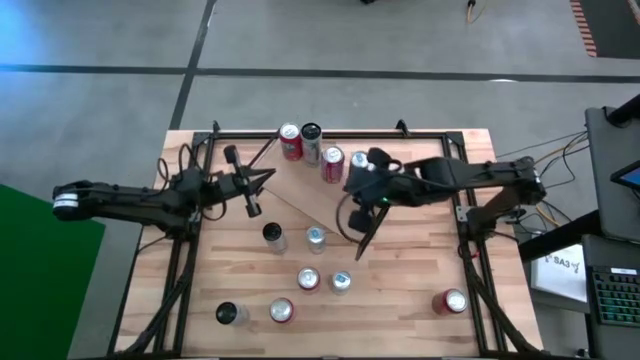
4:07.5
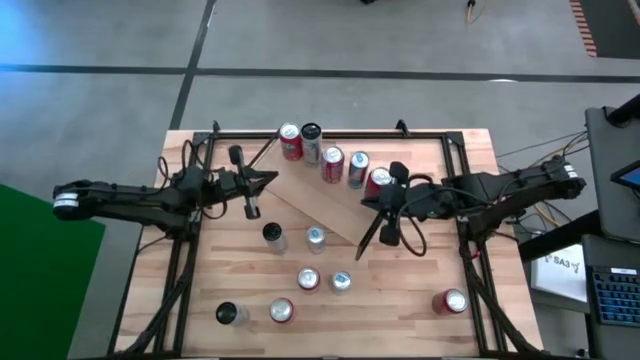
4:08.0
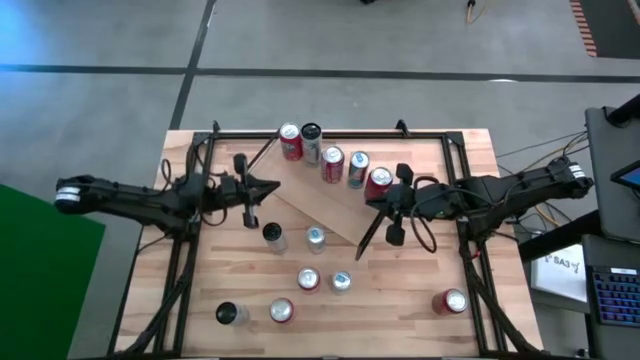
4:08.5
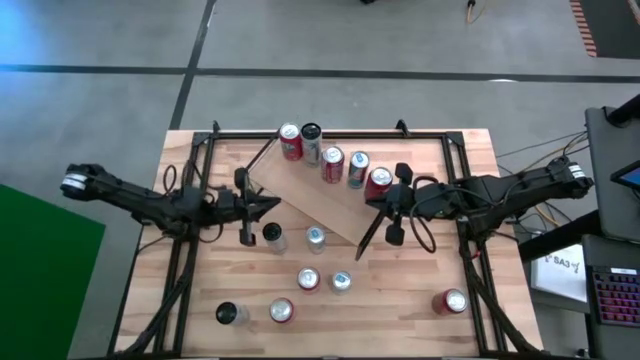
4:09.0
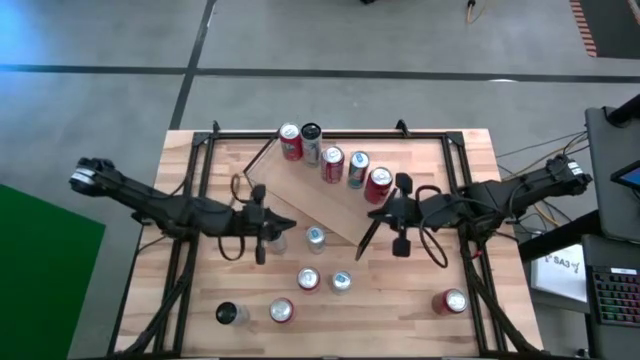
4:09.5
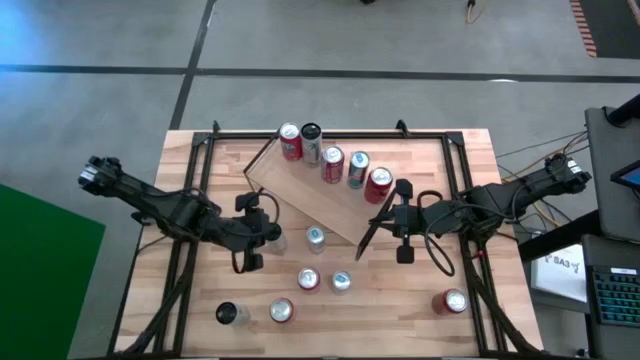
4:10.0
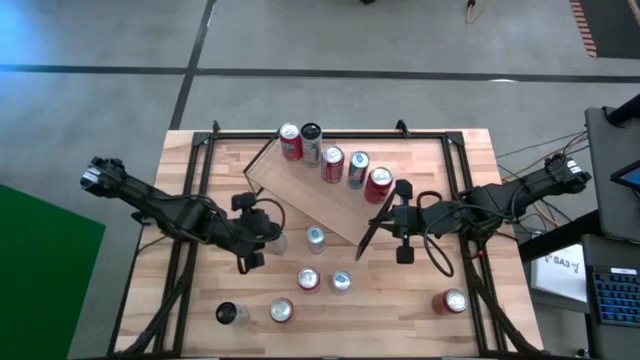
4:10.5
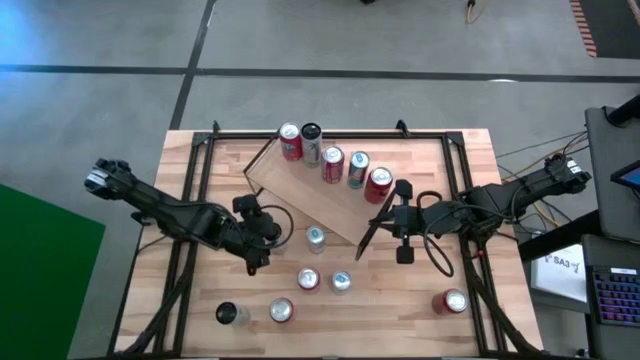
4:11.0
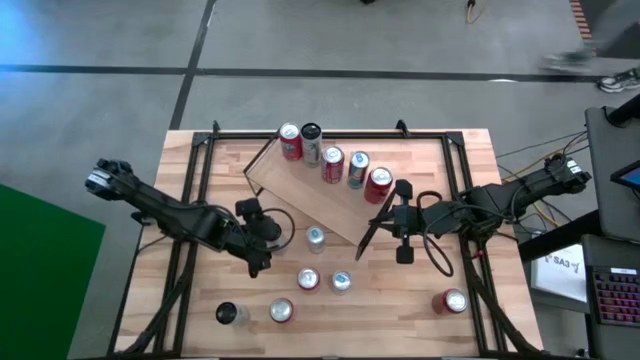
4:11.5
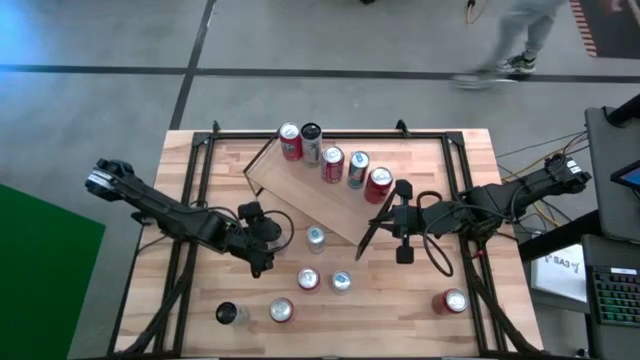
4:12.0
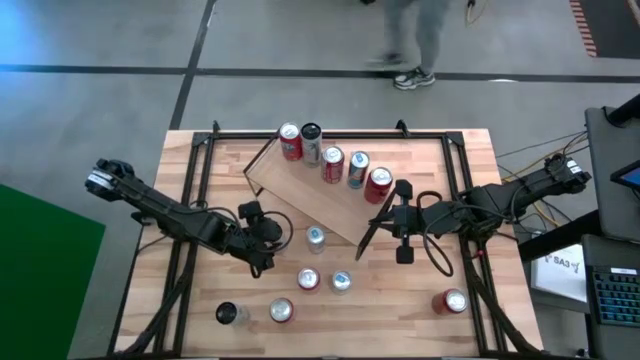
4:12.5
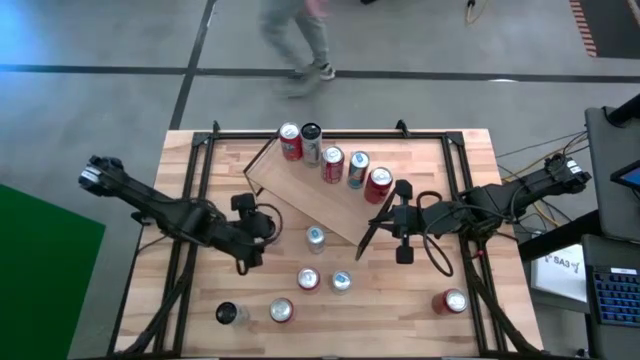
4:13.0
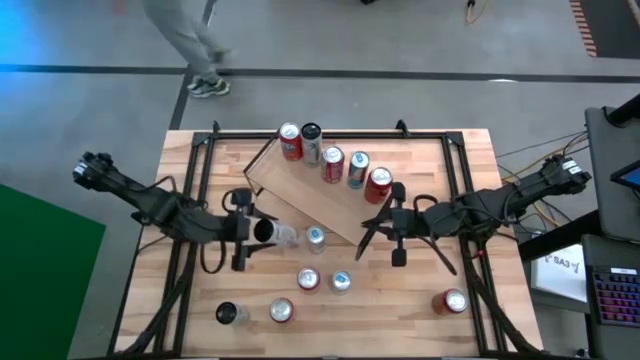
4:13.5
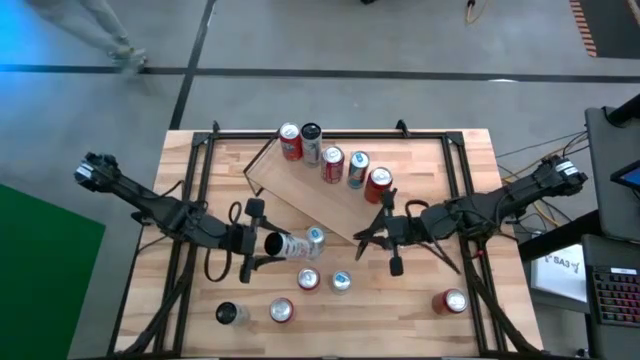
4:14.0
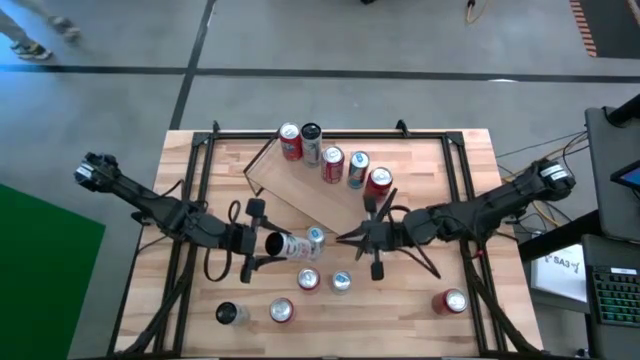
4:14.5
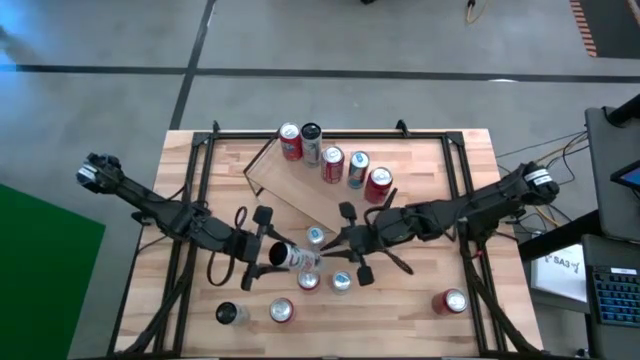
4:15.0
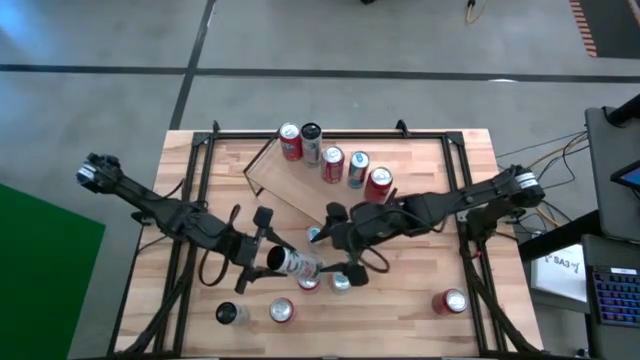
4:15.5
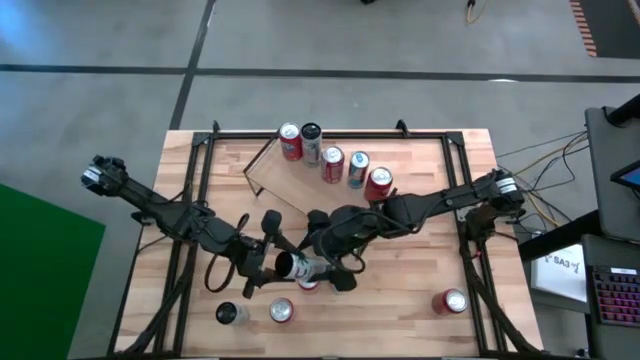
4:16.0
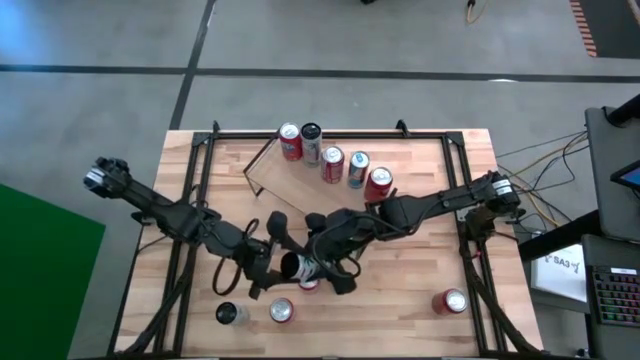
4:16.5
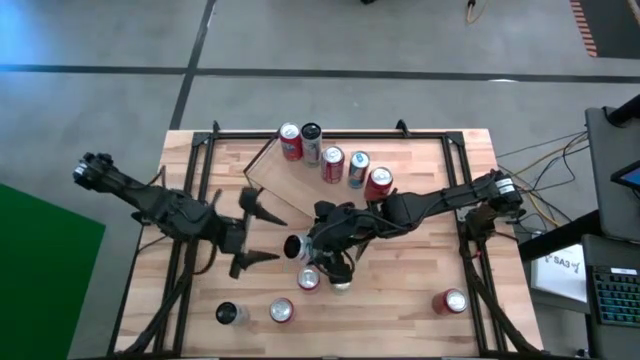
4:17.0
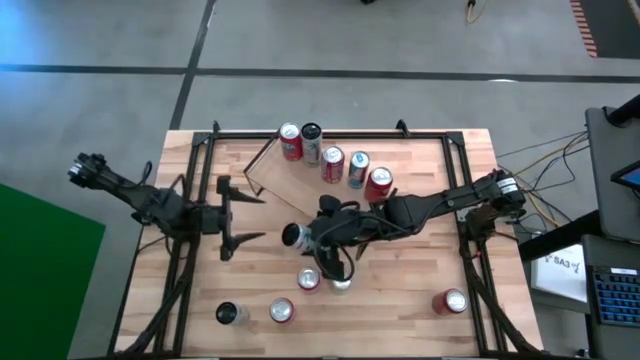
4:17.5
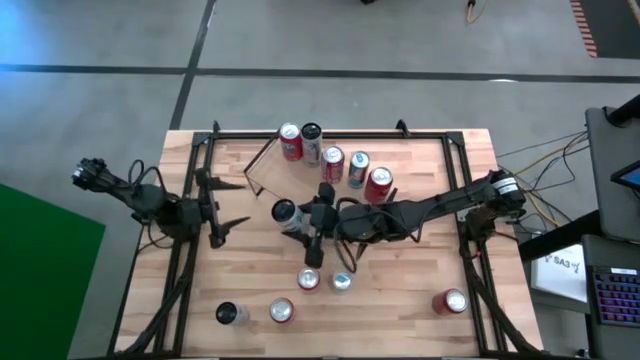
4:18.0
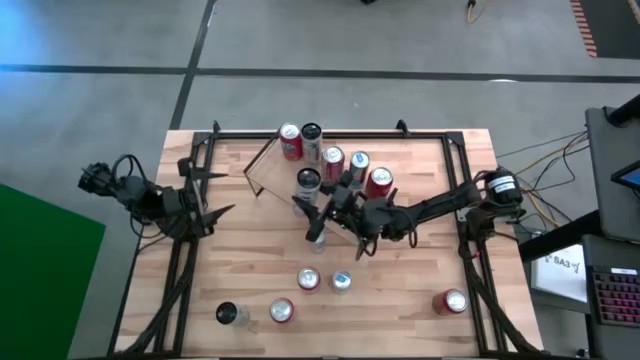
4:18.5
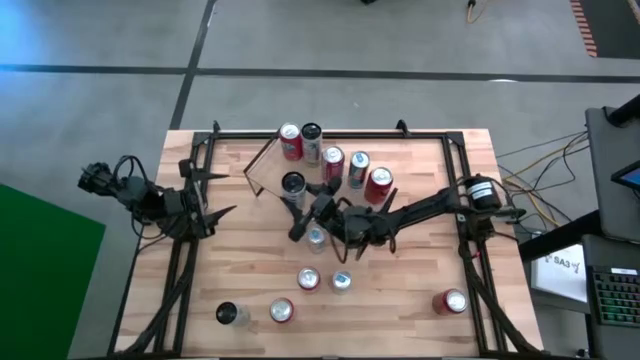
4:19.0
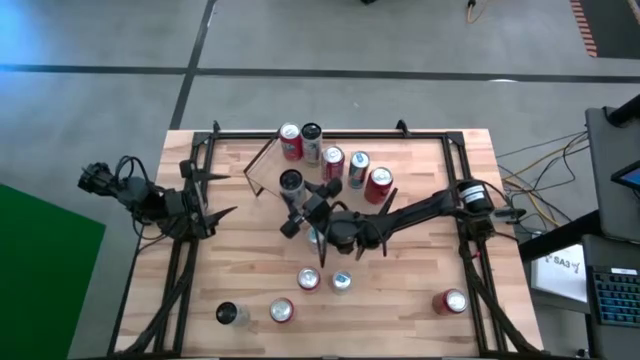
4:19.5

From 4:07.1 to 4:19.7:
Task: Place canned beverage on shelf
Put the white/pink soda can on the shelf, align with the other white pink soda can

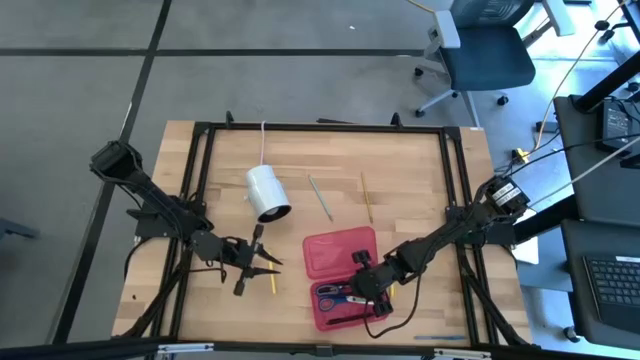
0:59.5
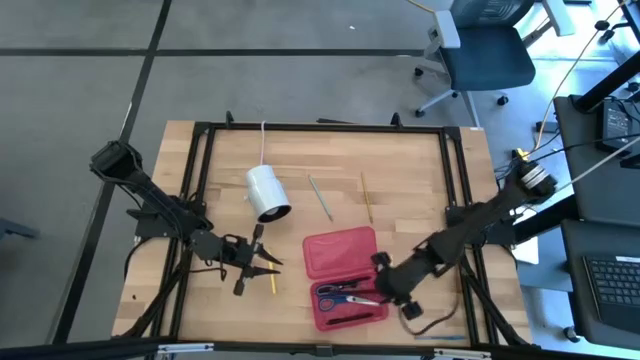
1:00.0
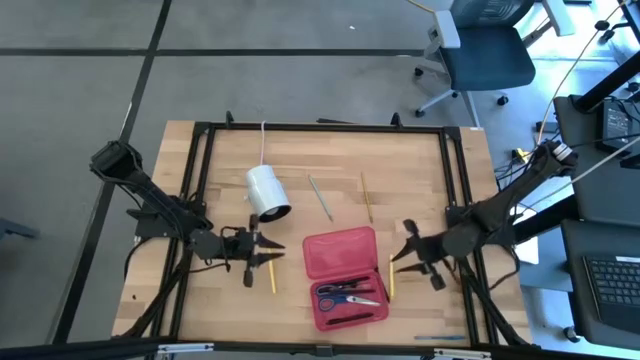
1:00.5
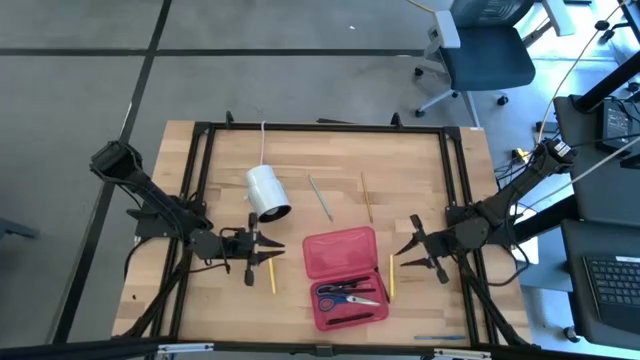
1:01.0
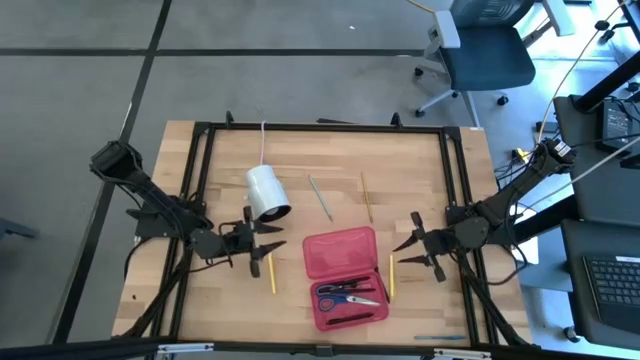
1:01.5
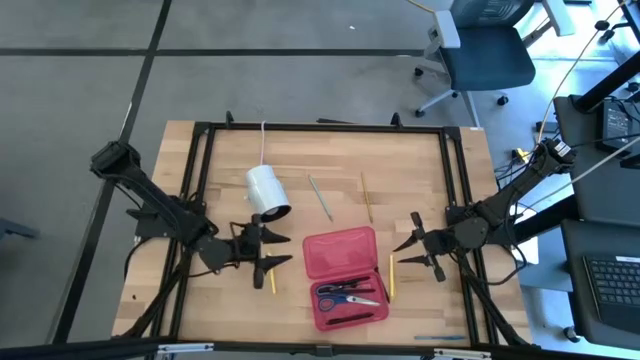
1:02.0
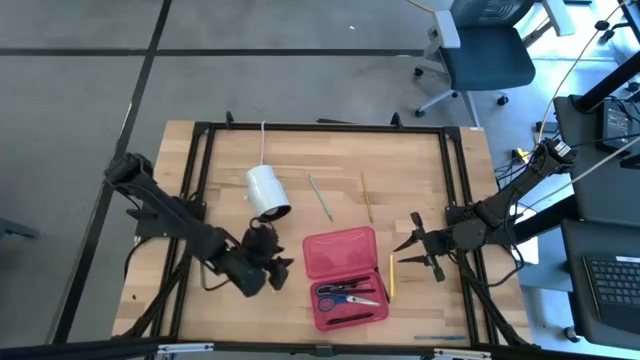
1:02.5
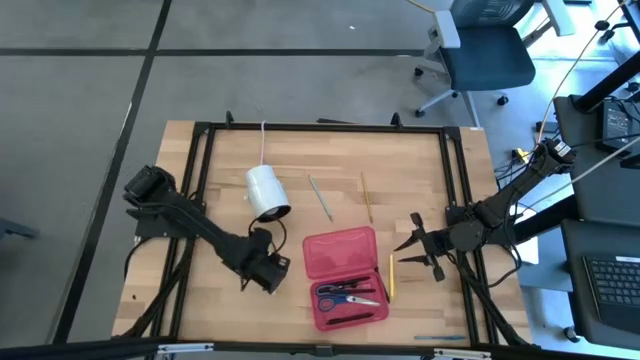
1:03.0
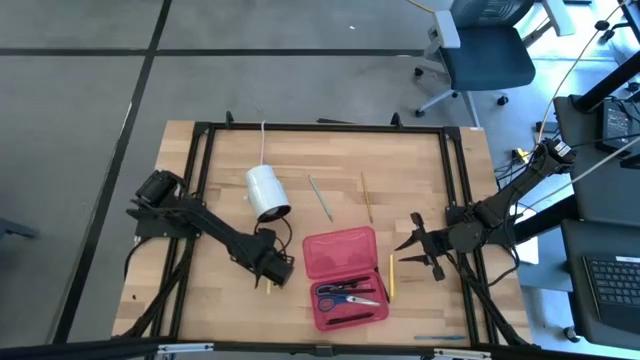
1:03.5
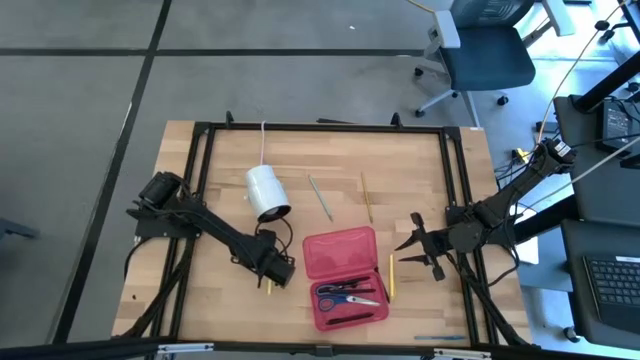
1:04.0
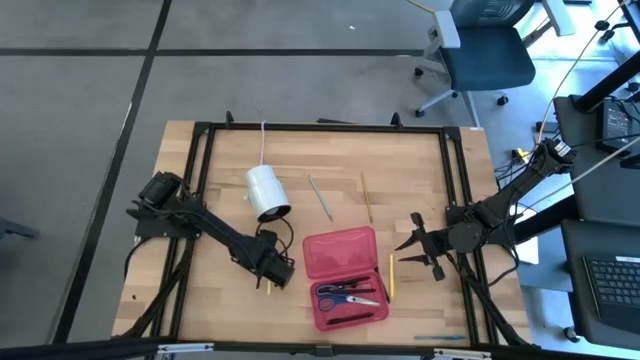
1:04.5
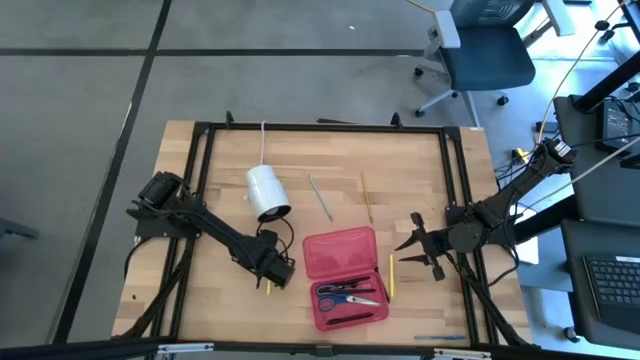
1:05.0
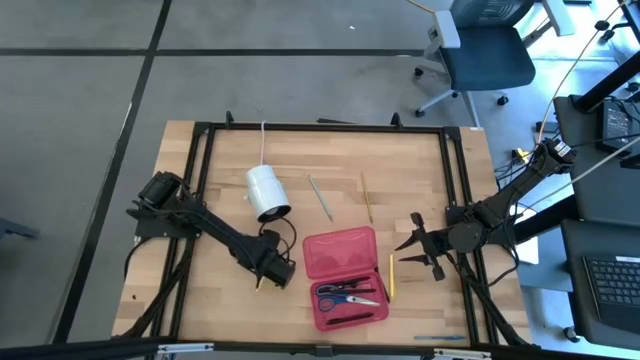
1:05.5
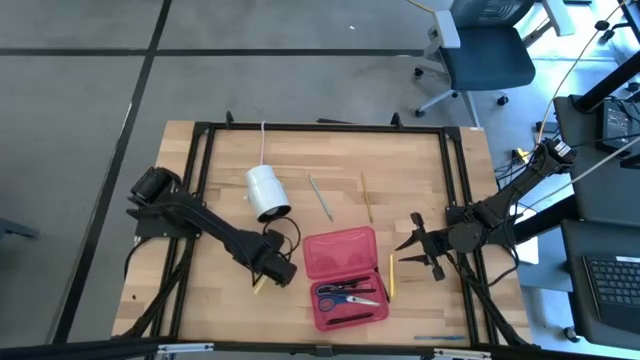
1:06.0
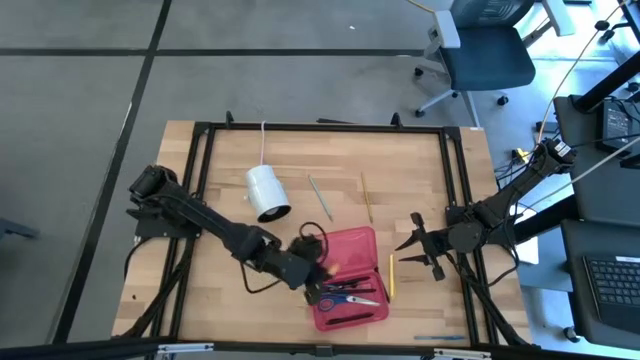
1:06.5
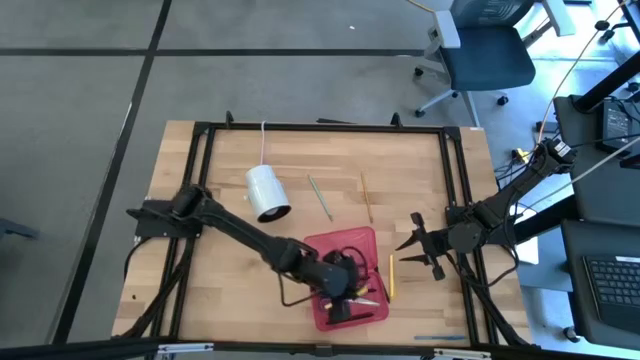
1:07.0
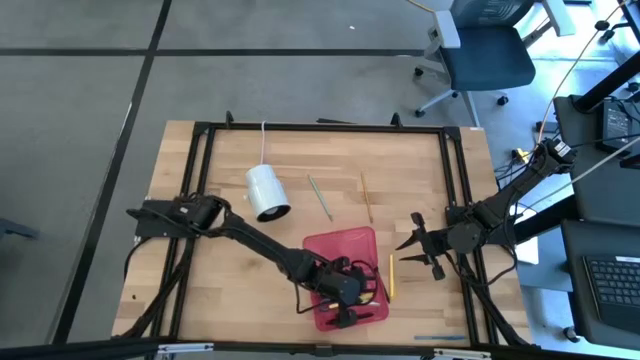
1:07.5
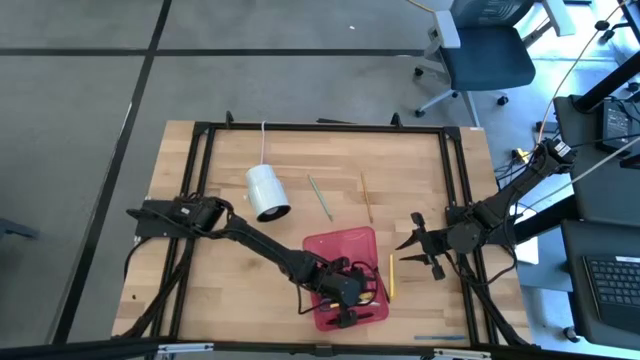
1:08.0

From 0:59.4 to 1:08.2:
Task: Pick & place school supplies into a supply box
Put the yellow pen into the pink supply box
